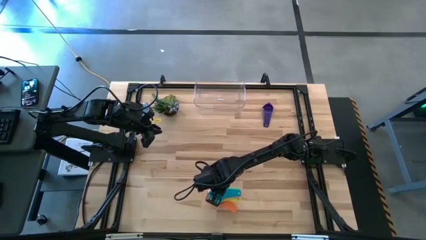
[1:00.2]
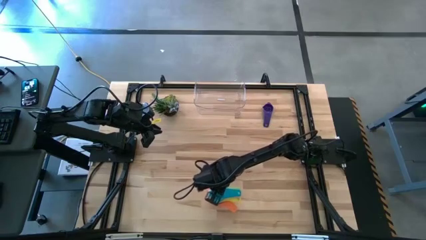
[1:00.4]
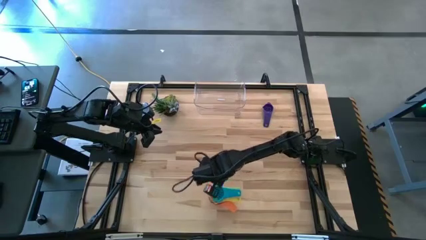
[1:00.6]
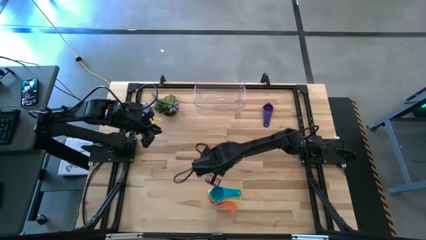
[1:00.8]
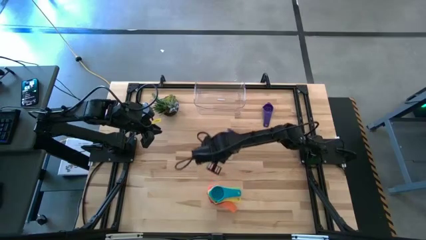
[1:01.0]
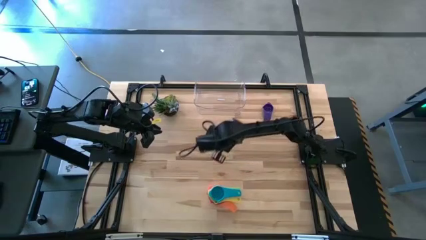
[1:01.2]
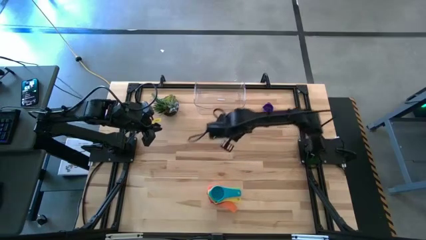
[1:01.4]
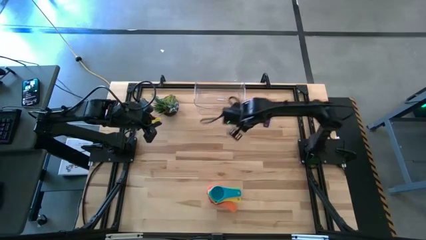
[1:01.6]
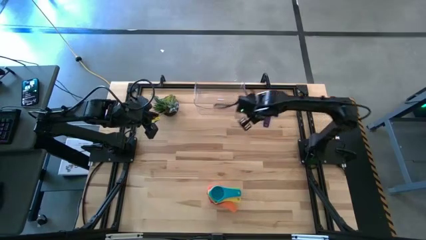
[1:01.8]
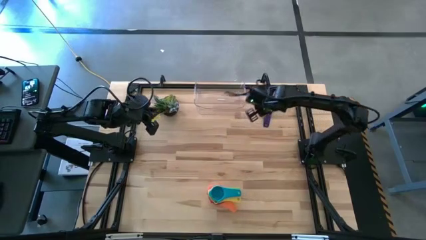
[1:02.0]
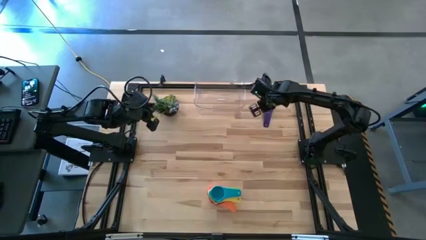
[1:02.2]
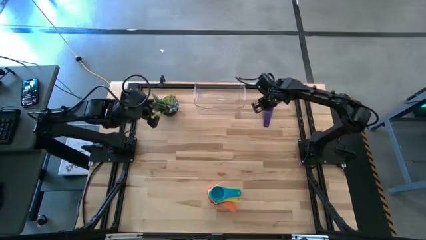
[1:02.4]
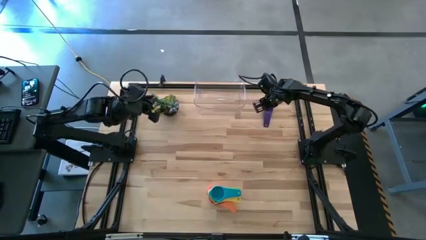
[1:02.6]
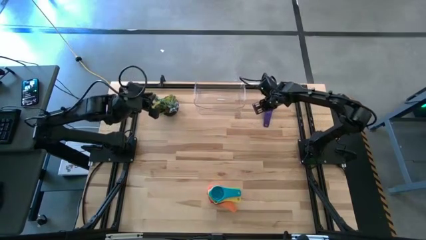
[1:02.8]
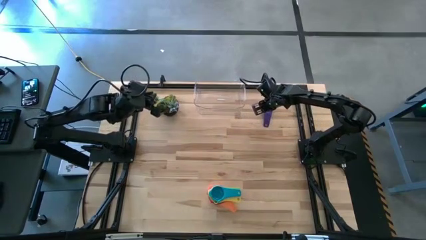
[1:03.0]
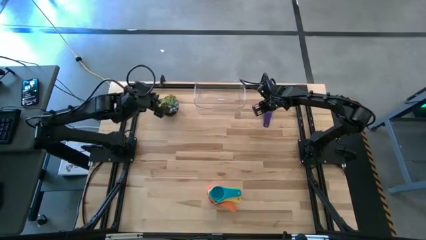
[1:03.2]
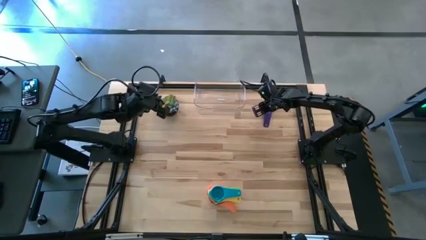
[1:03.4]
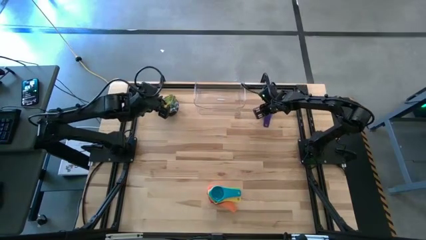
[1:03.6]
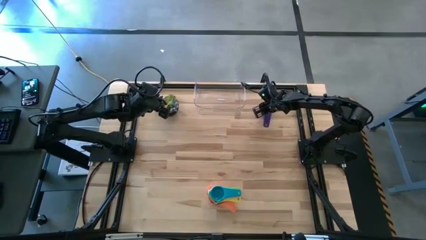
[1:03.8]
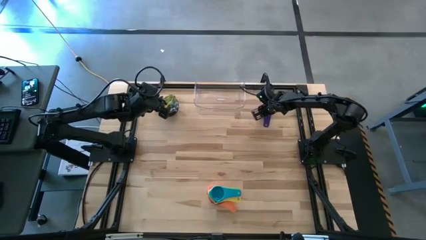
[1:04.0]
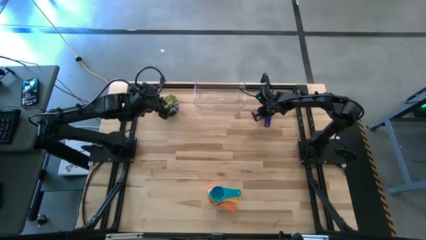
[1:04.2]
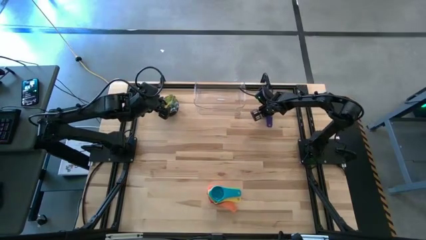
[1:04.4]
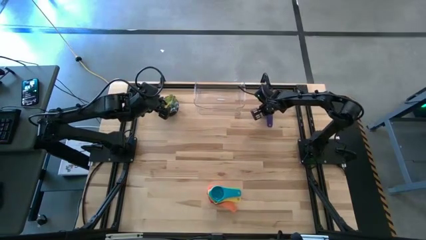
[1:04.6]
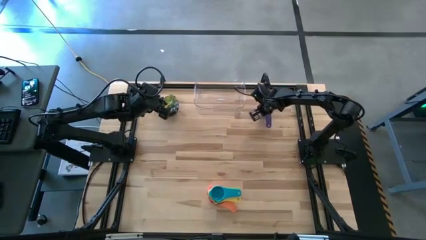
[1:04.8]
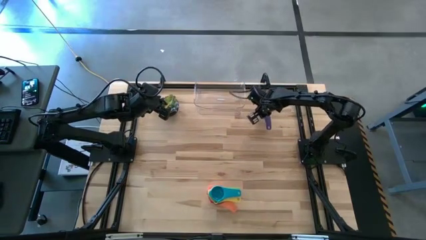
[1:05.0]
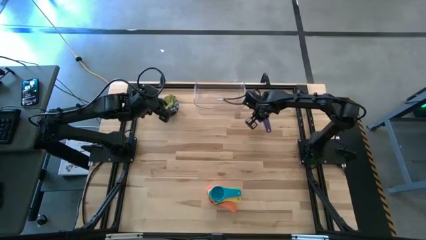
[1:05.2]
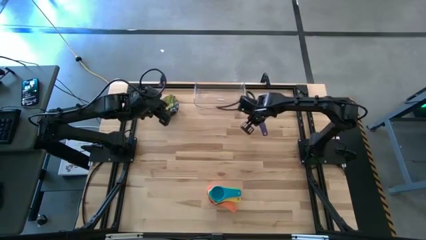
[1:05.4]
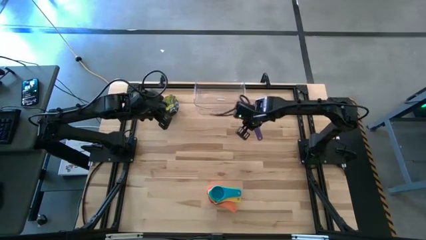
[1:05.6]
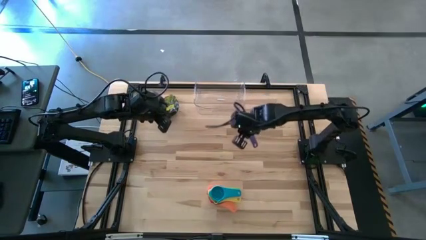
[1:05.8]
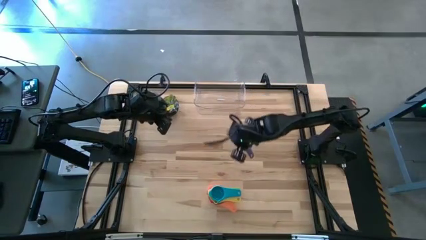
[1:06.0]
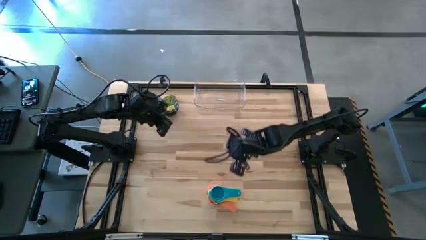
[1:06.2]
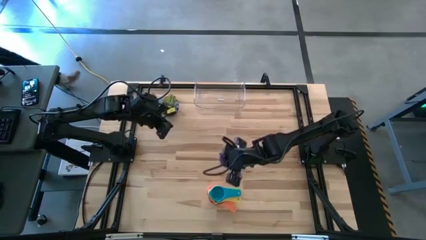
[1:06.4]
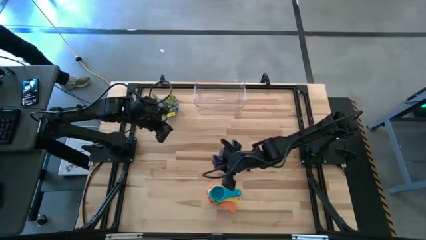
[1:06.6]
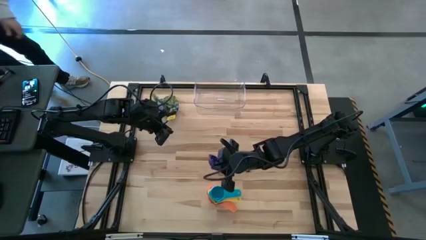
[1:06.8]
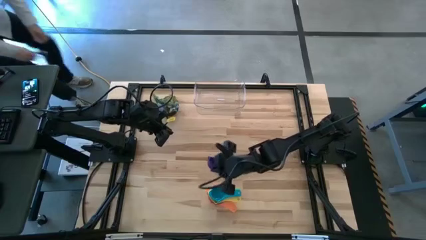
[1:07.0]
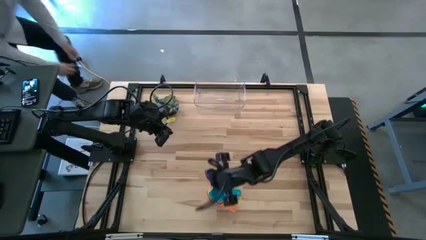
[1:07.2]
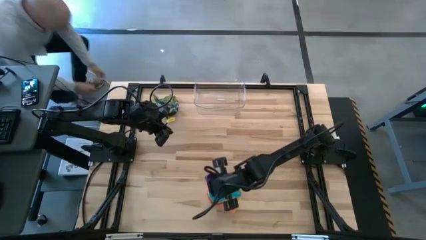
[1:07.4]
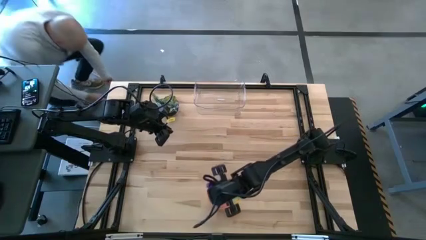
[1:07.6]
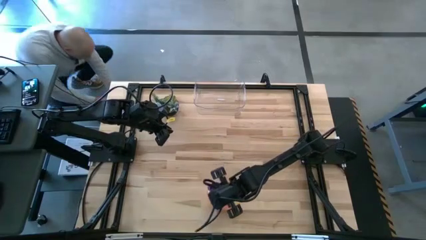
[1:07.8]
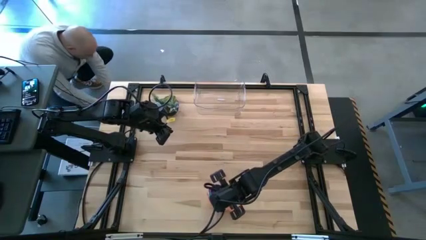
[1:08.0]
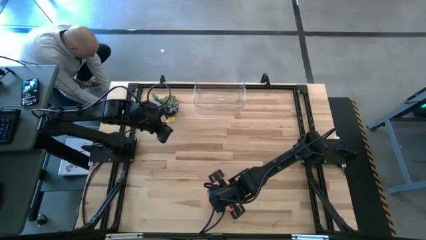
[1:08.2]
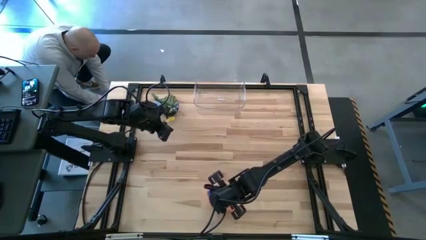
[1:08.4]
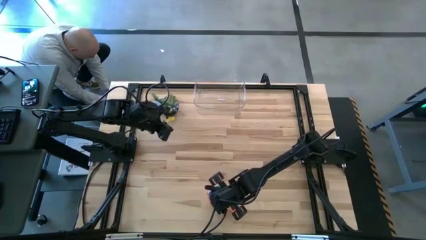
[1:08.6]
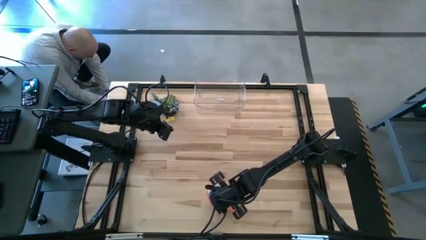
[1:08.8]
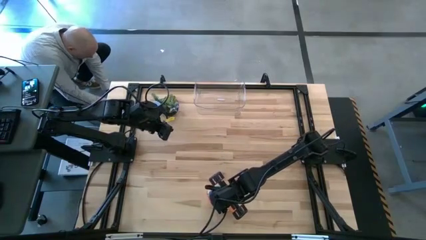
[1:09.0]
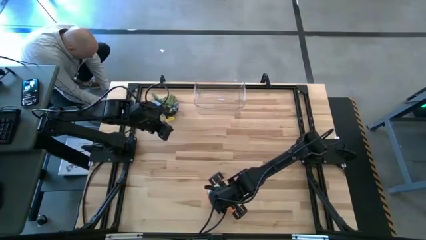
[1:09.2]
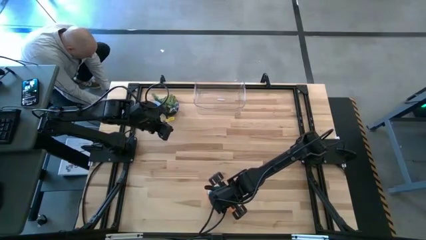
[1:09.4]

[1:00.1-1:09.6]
Task: Nest measuring cups in basket
Stack the dark blue measuring cup on the light blue measuring cup

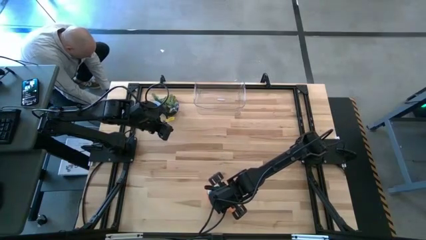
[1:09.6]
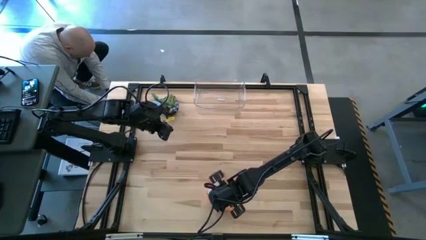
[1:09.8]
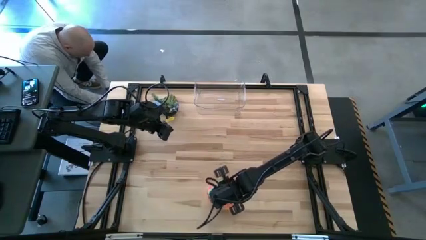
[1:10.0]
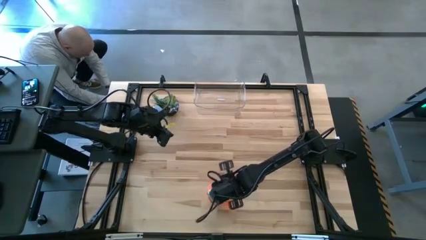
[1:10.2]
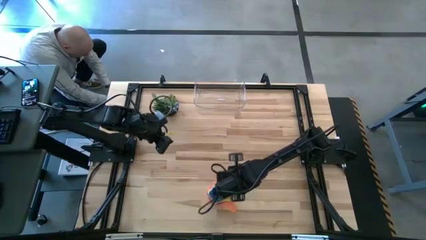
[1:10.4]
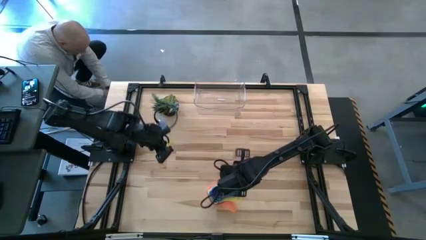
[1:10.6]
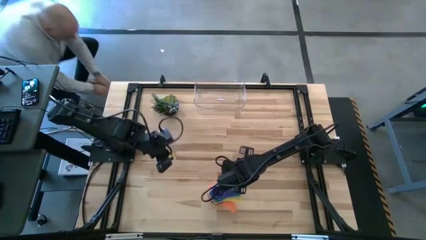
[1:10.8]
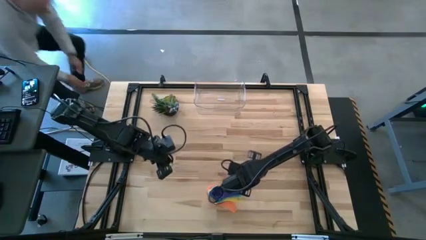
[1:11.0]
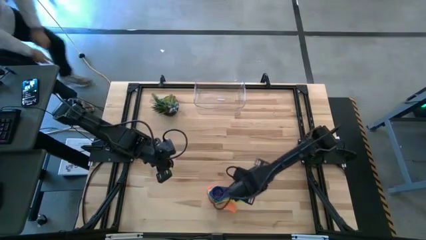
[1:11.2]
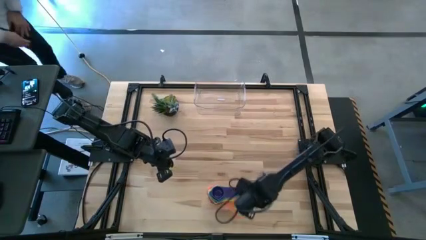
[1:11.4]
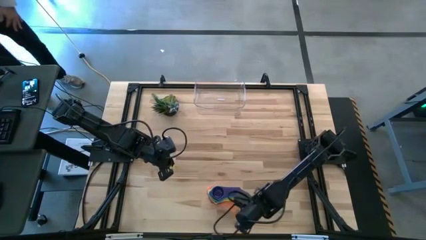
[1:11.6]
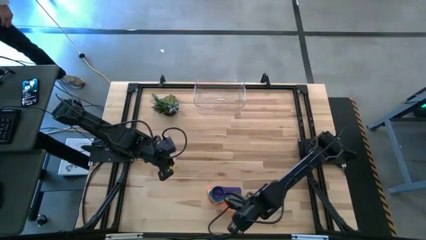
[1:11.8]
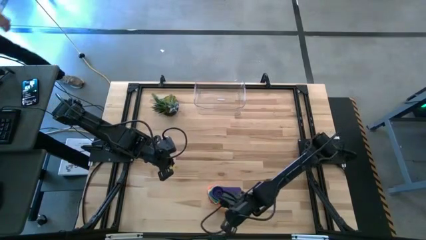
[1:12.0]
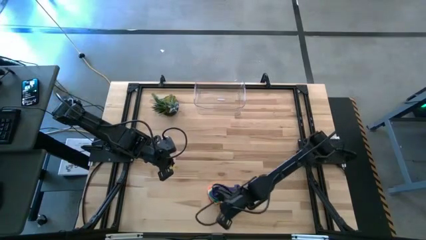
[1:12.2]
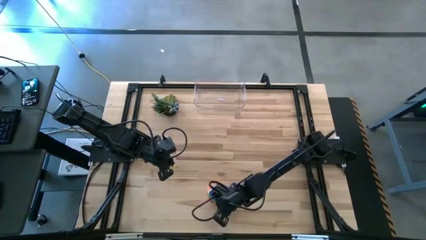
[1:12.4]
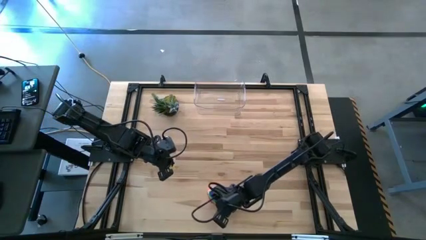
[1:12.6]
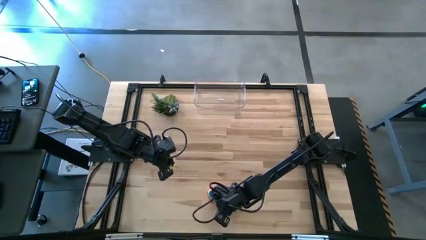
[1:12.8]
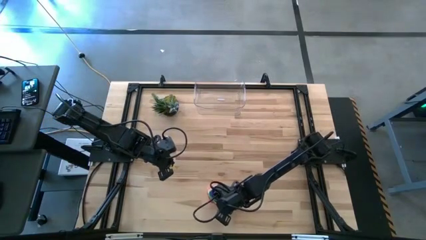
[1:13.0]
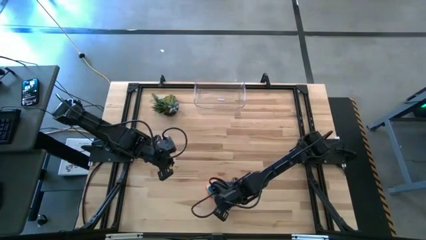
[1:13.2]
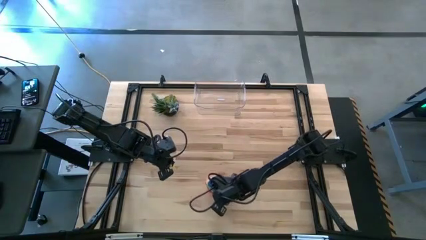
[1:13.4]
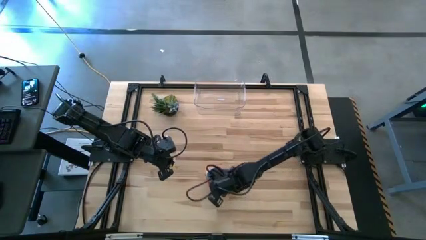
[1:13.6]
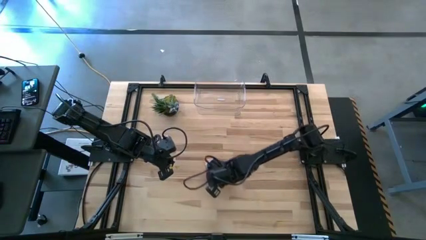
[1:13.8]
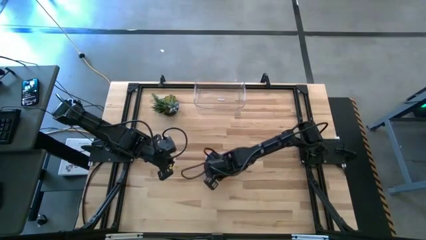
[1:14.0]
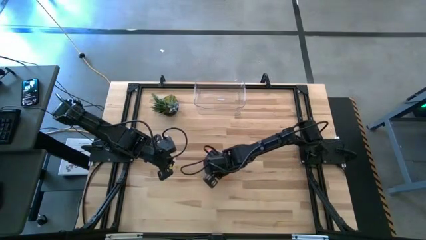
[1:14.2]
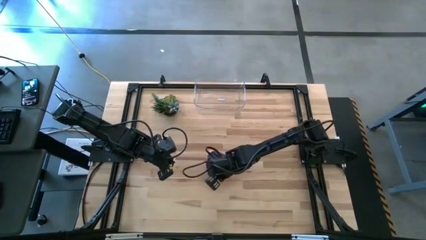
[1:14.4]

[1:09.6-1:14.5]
Move the stacked measuring cups to the center of the table

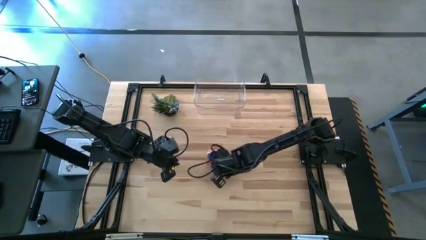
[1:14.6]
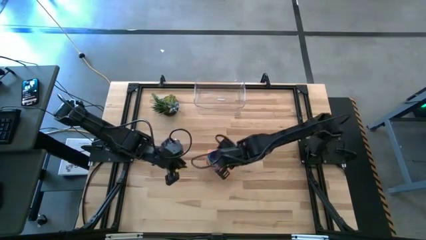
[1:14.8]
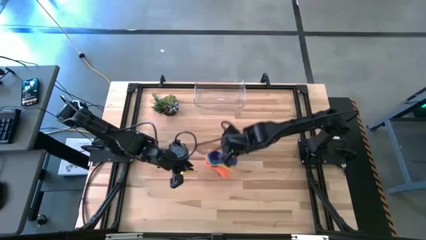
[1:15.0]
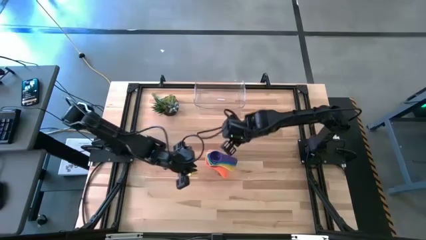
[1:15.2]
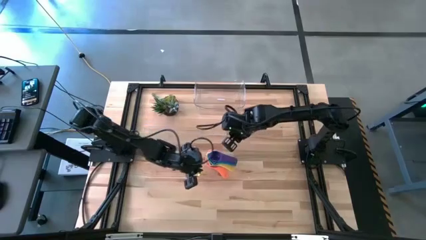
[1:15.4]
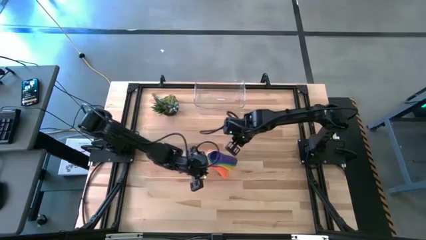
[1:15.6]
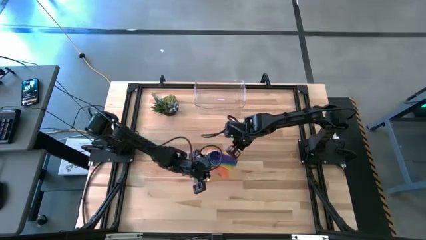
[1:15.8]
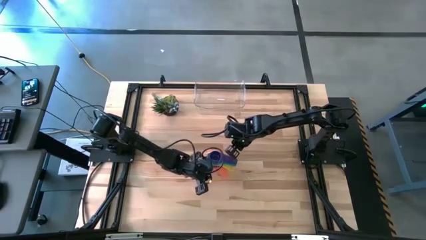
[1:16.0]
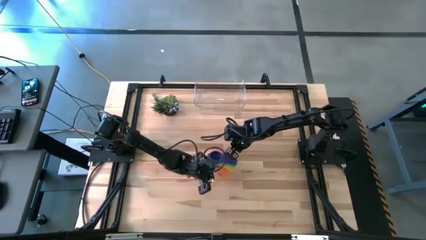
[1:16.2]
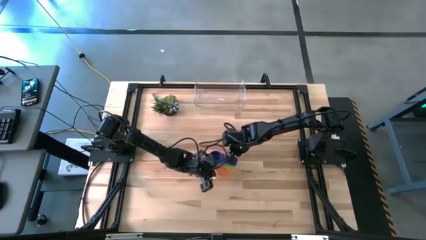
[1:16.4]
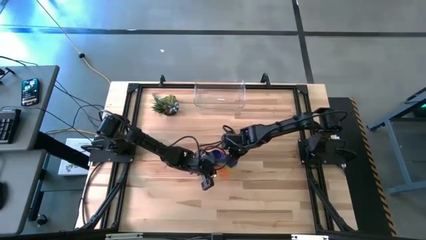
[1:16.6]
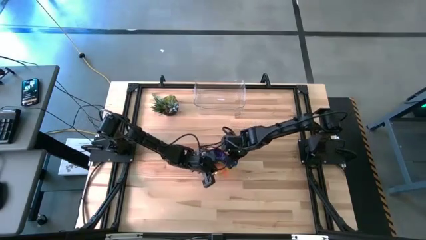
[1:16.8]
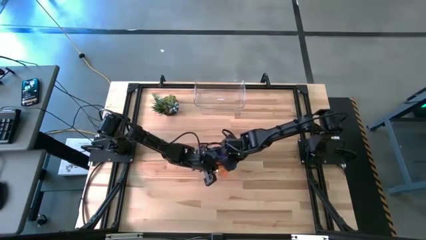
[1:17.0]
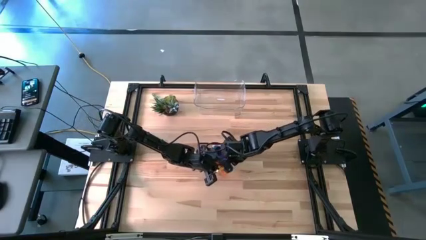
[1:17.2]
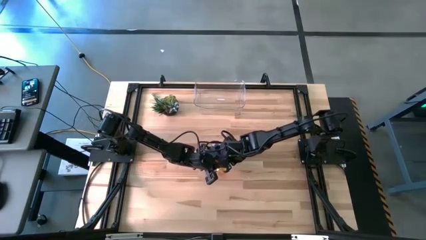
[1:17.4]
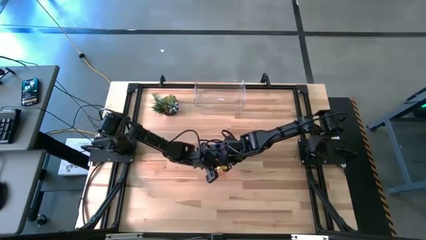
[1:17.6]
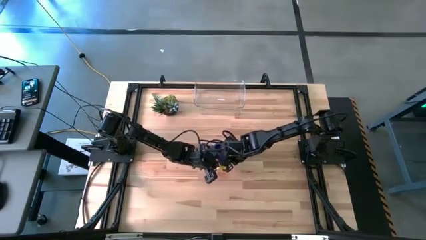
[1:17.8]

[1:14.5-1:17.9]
Adjust the stacked measuring cups
